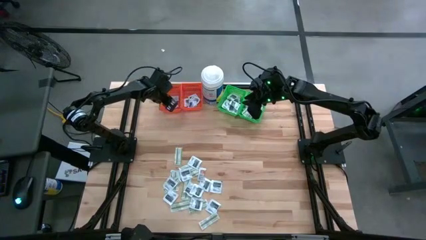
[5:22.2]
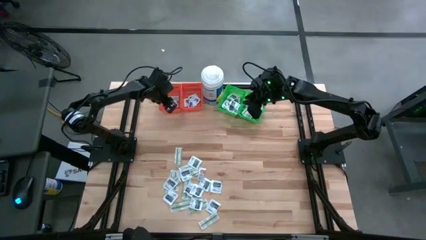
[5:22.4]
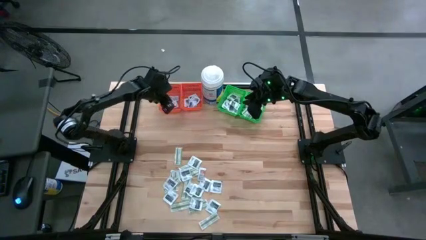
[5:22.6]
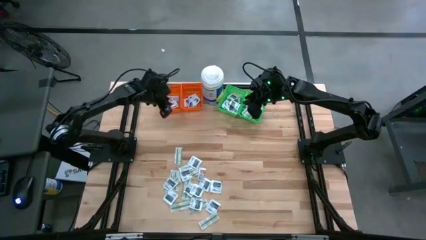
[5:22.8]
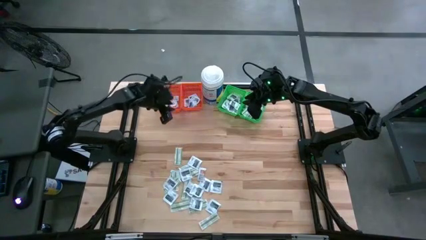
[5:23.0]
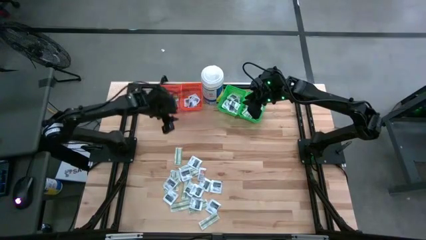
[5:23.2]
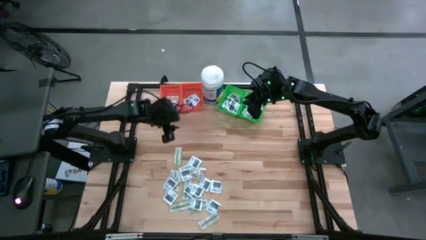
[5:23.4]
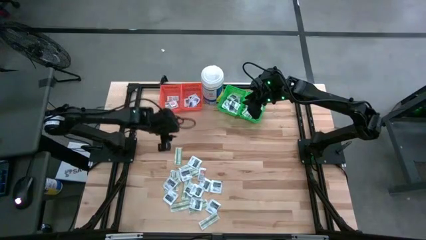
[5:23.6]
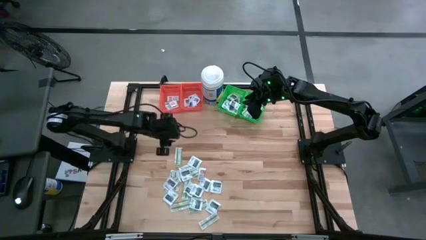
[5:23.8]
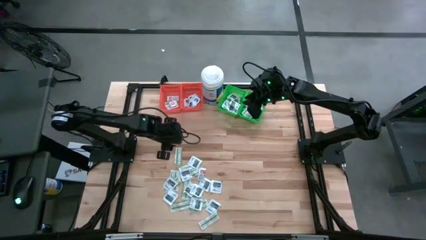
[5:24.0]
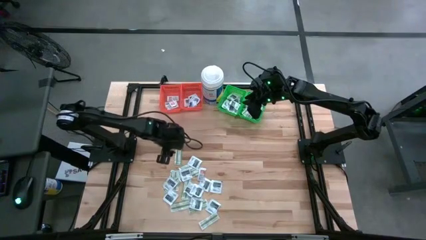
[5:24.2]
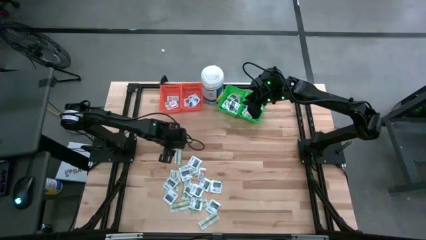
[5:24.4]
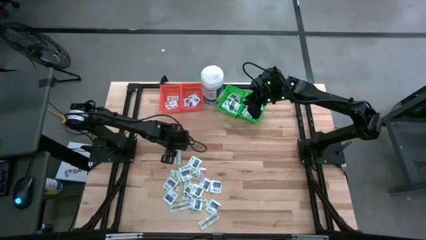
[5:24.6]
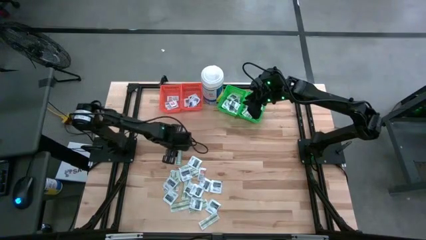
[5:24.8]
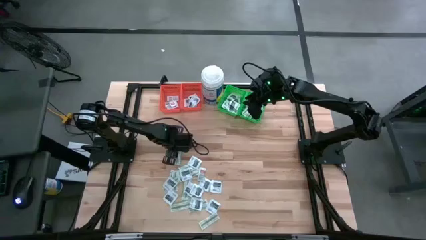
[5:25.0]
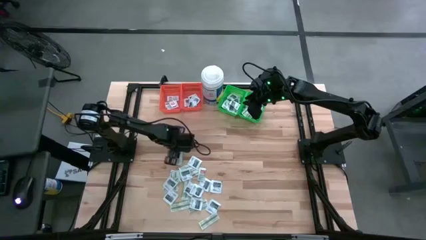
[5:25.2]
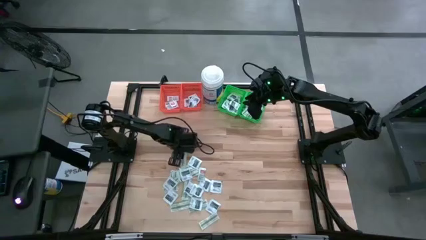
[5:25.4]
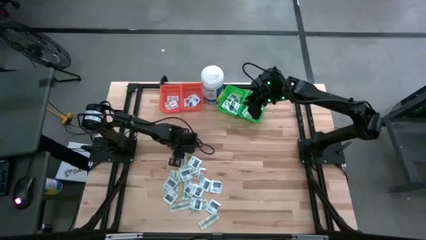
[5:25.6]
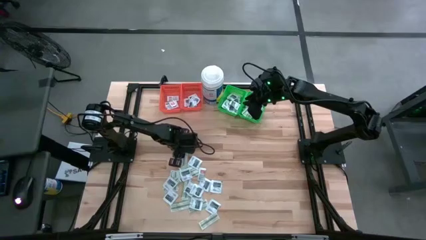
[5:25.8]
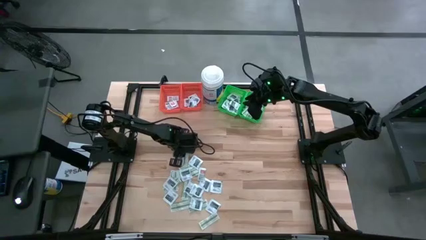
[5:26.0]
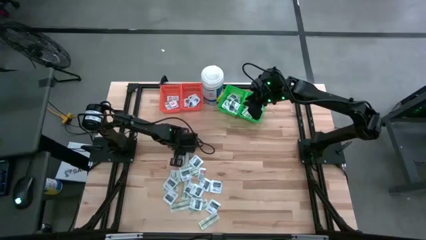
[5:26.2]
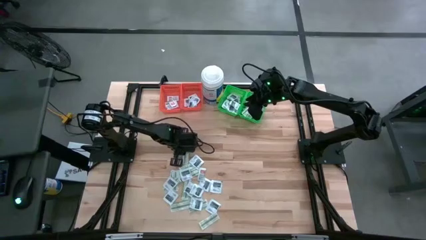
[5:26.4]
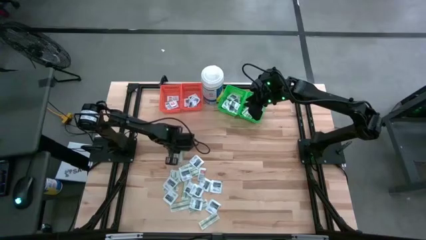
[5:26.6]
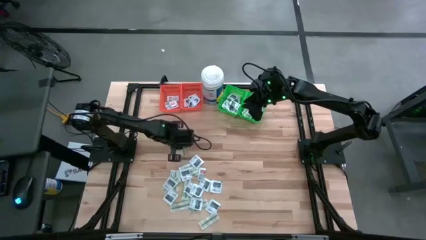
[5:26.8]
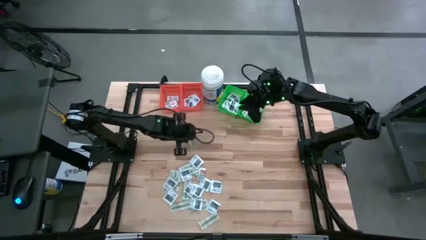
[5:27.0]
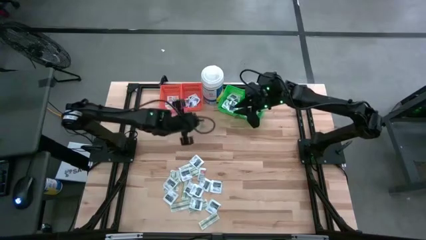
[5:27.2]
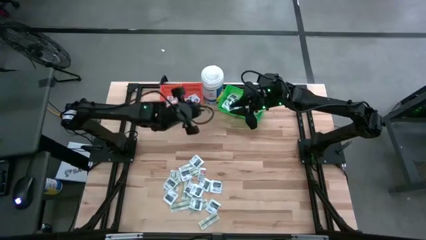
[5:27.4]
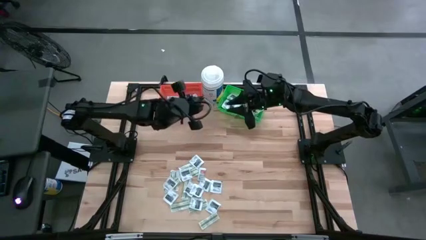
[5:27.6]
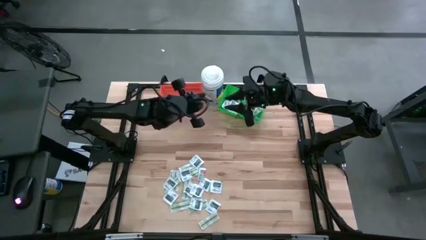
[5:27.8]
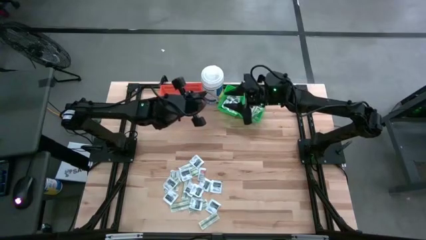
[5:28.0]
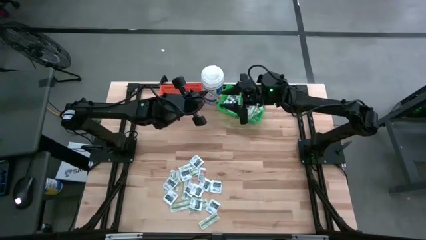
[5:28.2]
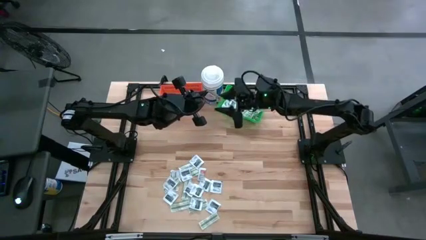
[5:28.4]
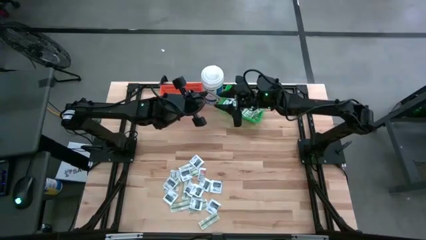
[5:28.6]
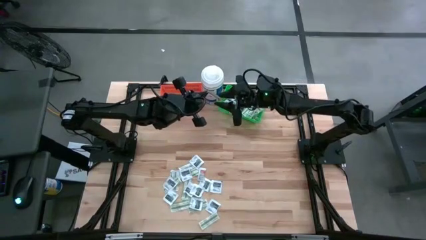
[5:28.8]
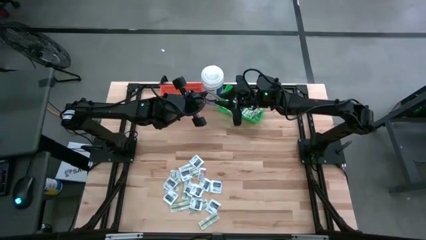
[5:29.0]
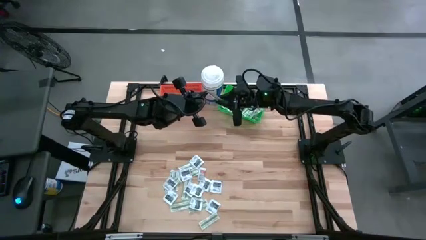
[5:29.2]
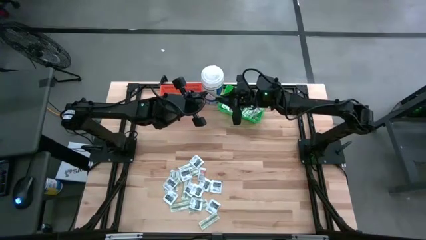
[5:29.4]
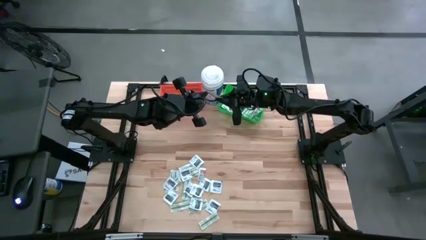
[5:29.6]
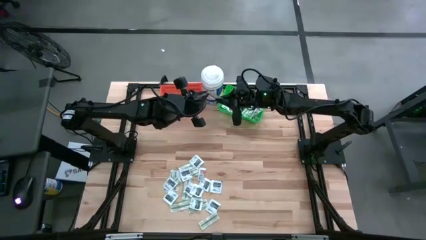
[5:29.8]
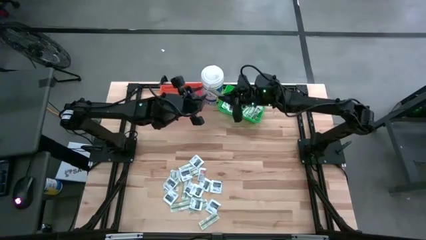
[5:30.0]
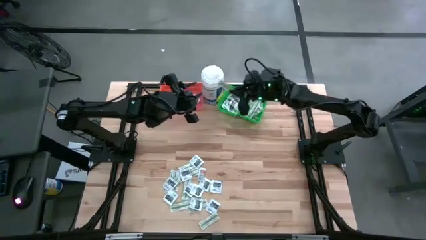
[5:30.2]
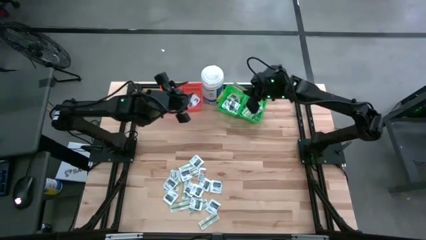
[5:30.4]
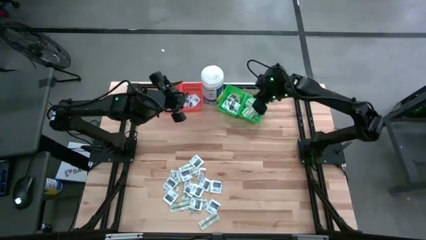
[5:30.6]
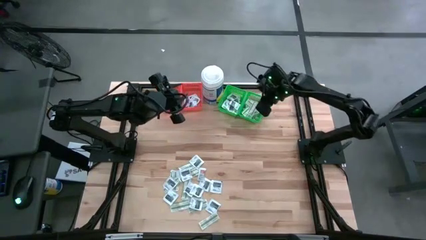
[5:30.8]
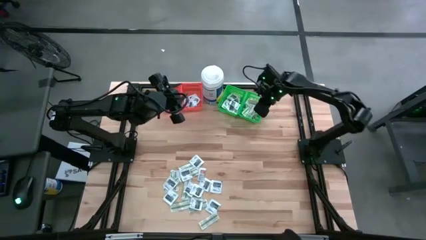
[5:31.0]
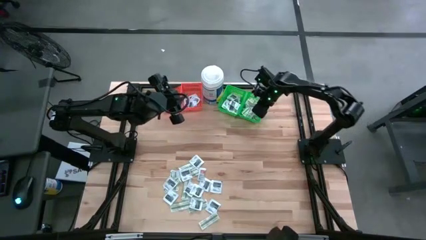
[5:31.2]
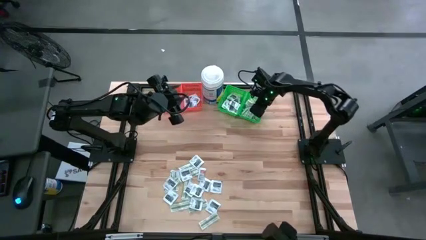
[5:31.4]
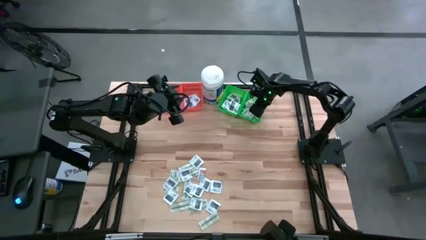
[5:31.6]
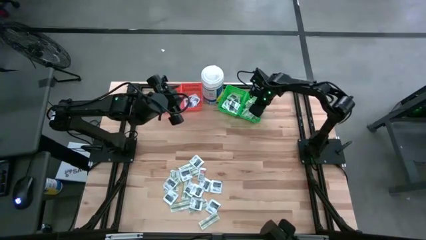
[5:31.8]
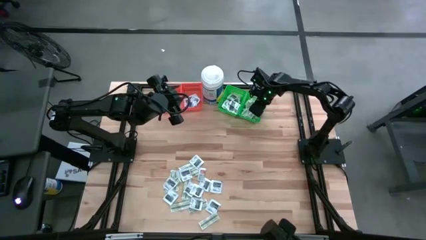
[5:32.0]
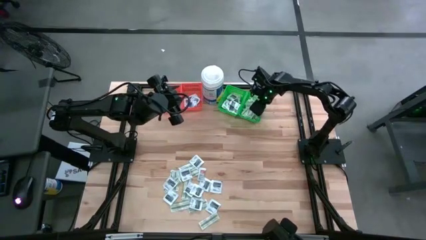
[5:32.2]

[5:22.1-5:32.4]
Task: Pick & Place First Aid Supplies
Put the green bandage pack into the right green bin

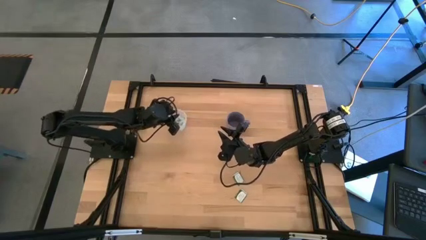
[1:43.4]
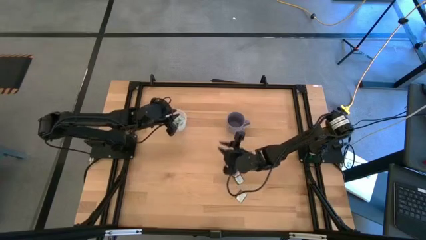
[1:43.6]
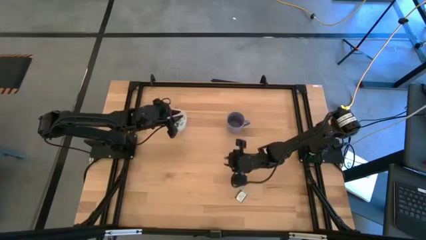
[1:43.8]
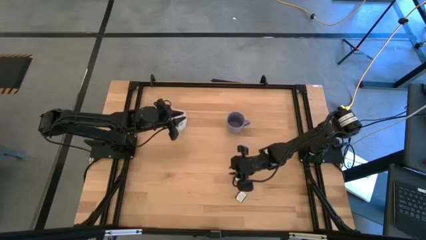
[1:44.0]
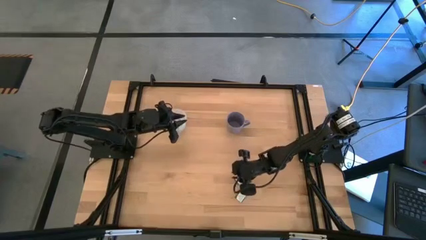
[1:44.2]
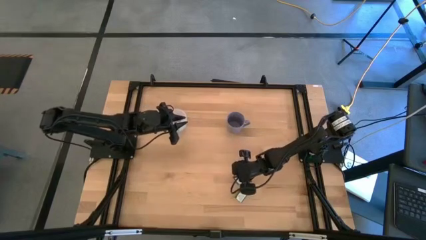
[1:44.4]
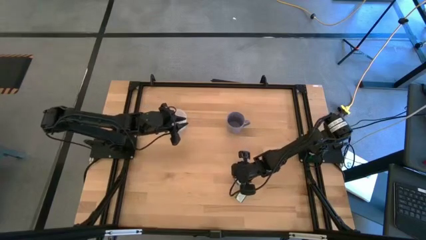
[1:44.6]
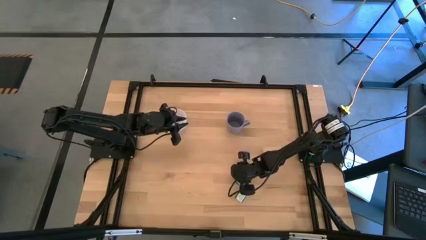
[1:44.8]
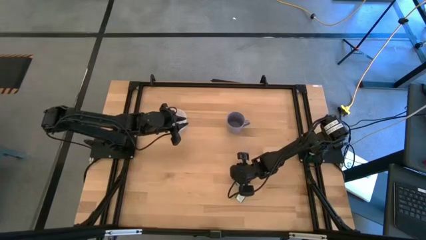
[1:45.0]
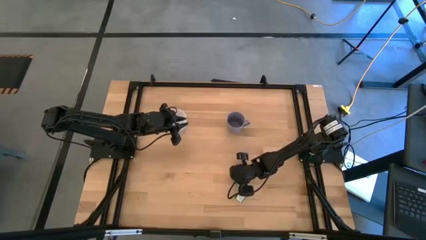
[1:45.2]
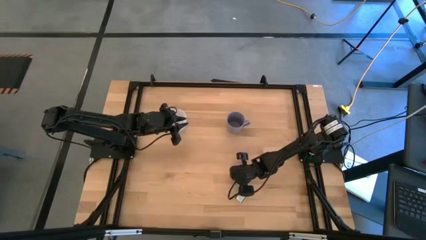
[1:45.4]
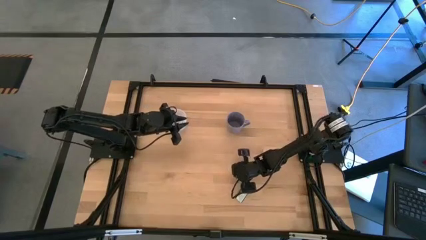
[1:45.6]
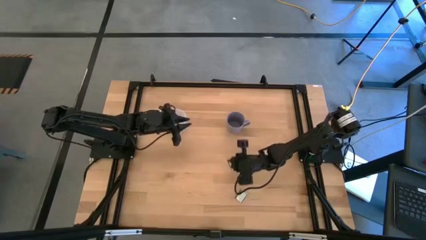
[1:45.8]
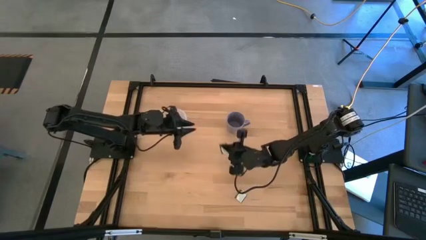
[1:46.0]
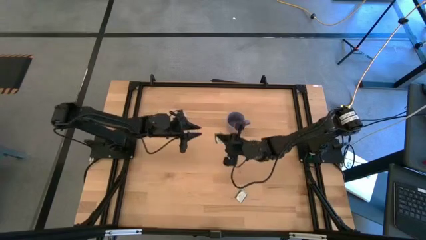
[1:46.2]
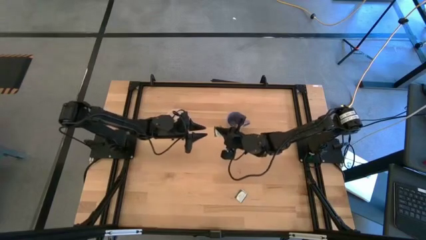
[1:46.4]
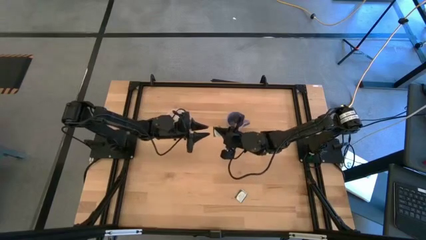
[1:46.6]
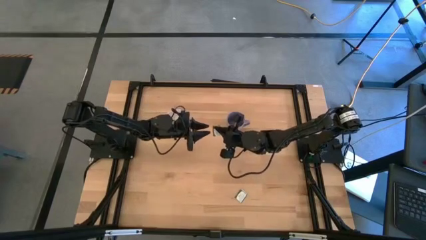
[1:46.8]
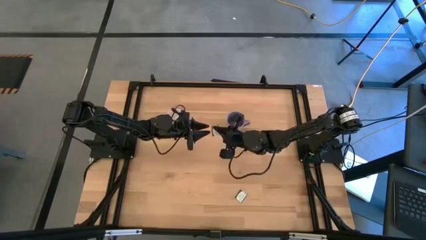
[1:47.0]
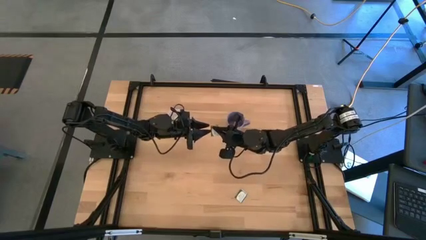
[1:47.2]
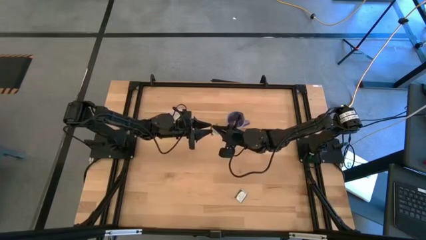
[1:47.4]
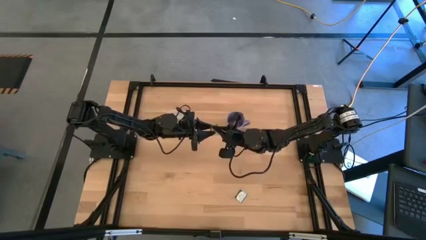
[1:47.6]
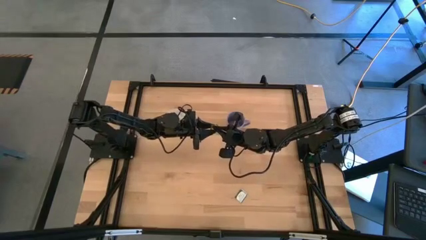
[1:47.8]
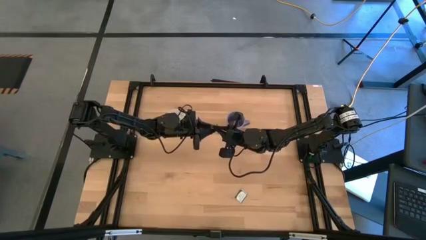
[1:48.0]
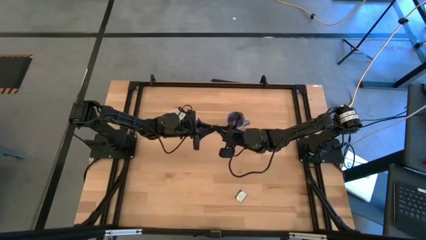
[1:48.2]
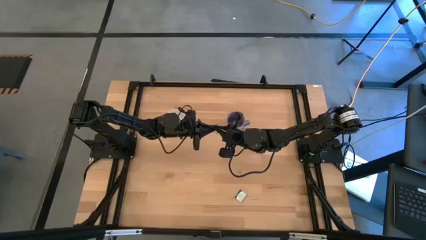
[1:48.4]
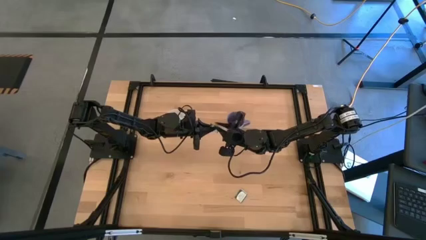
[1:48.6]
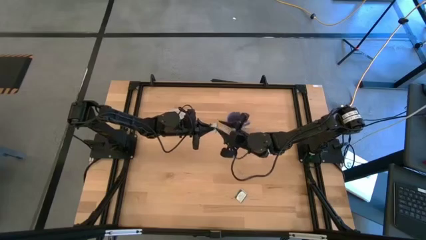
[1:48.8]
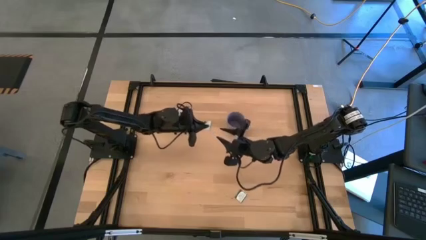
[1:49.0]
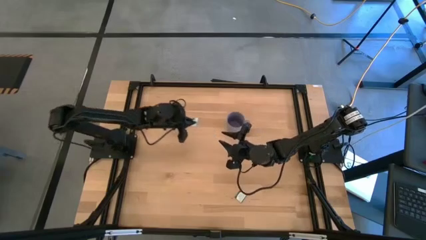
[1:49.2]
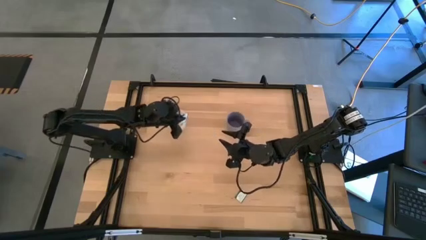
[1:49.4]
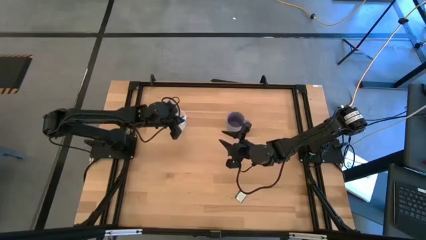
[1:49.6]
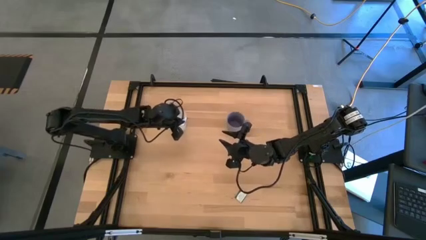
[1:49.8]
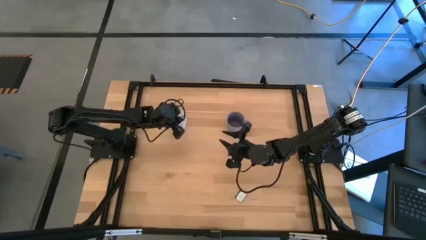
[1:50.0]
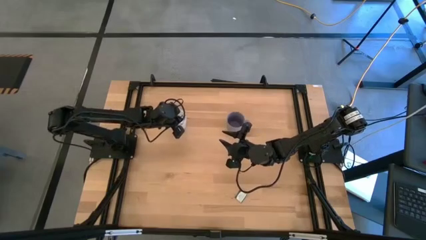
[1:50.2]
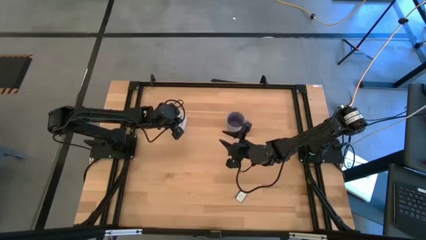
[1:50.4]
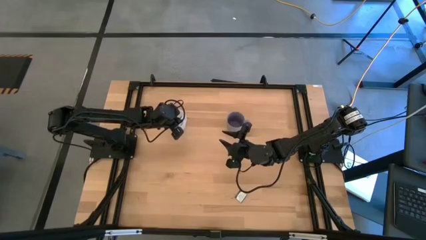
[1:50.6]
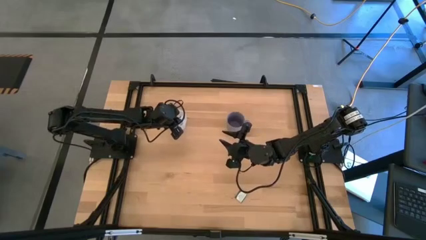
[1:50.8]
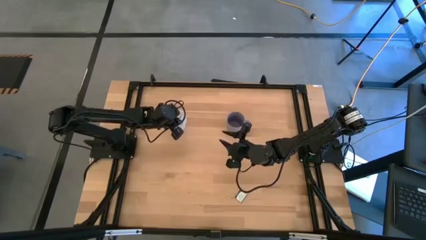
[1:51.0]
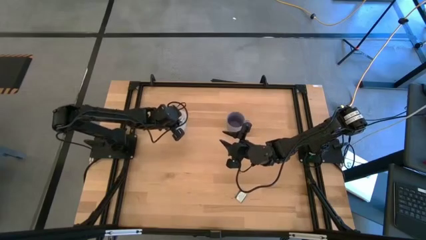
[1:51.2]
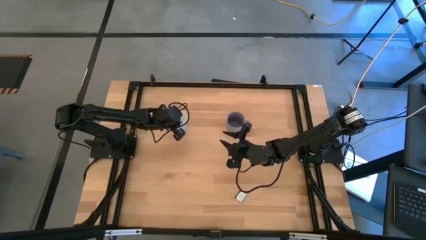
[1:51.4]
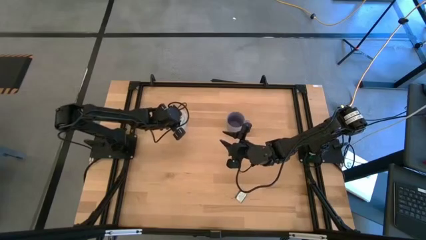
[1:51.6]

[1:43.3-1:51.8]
Task: Pick and place Stevia / Truvia into bins
Put the green stevia packet into the transparent container
